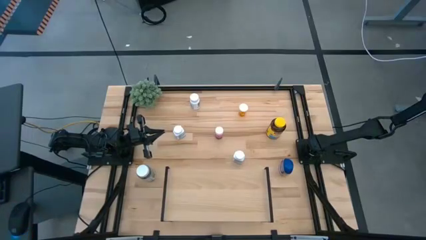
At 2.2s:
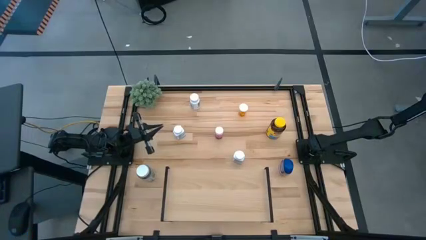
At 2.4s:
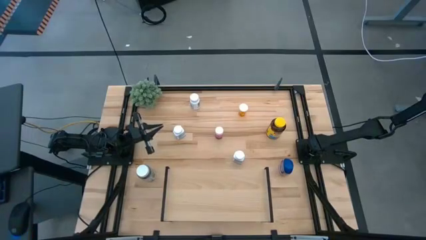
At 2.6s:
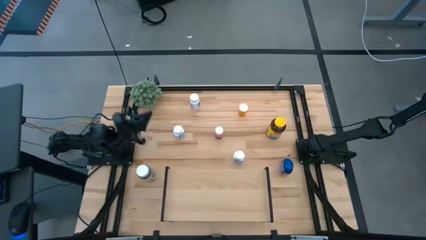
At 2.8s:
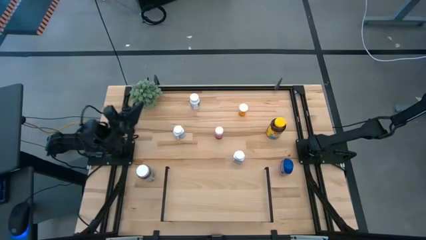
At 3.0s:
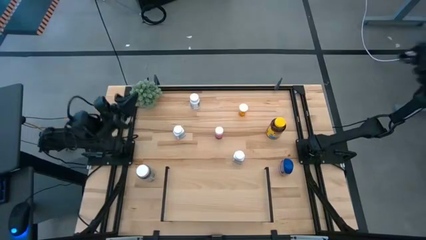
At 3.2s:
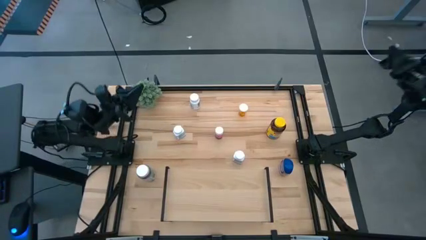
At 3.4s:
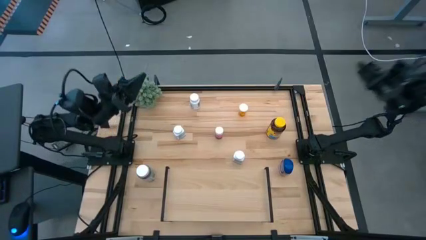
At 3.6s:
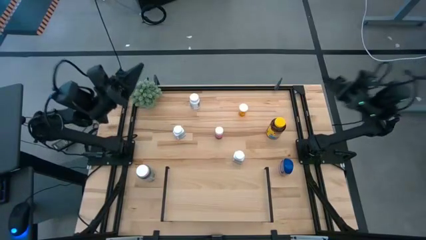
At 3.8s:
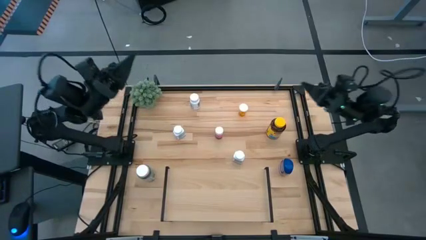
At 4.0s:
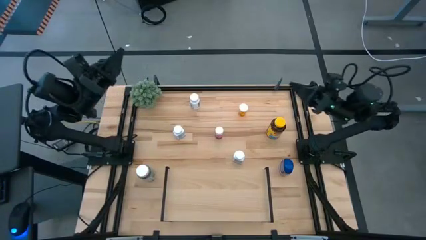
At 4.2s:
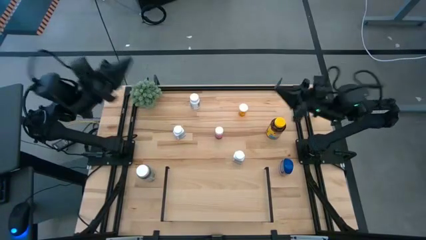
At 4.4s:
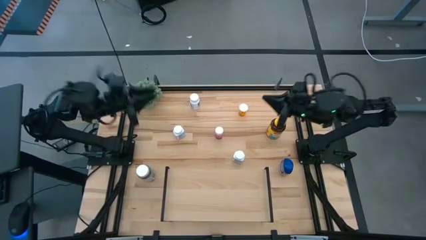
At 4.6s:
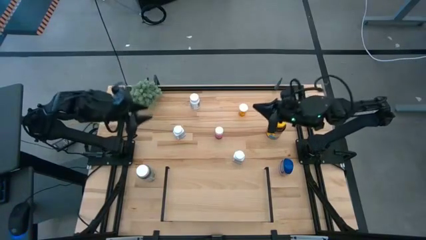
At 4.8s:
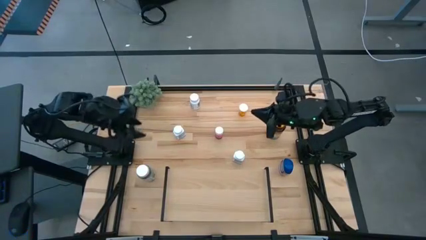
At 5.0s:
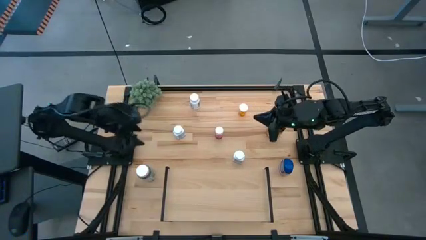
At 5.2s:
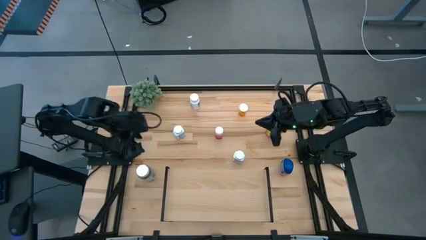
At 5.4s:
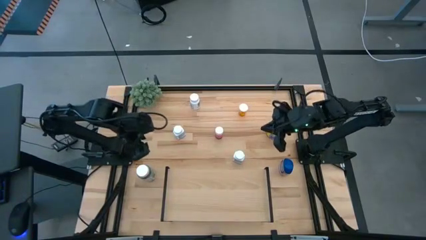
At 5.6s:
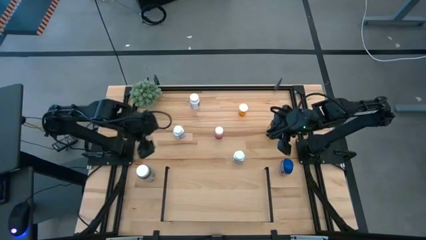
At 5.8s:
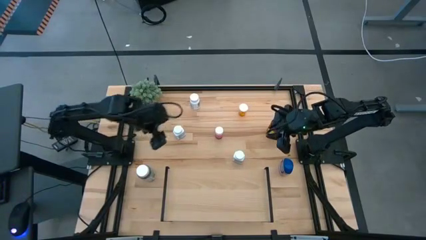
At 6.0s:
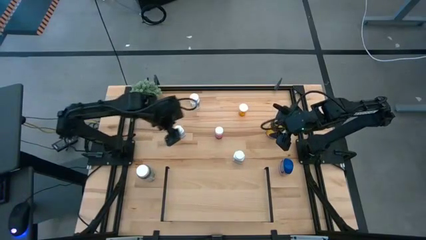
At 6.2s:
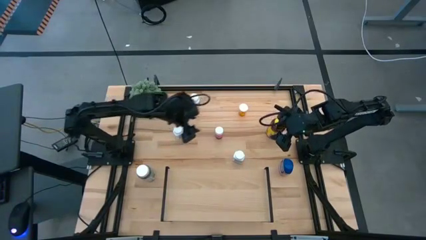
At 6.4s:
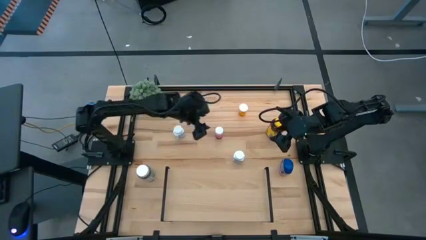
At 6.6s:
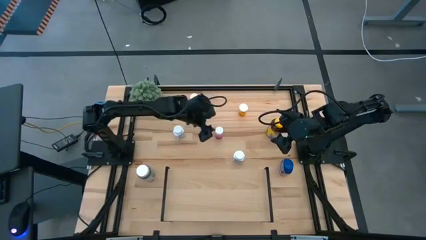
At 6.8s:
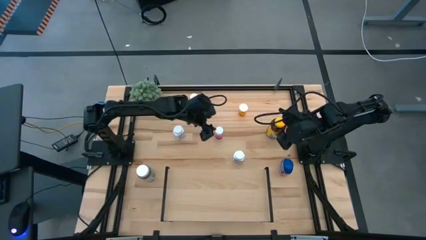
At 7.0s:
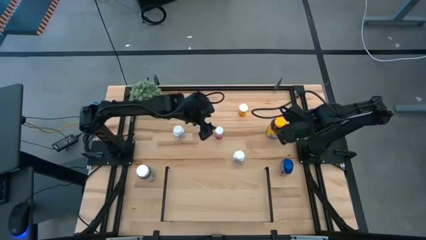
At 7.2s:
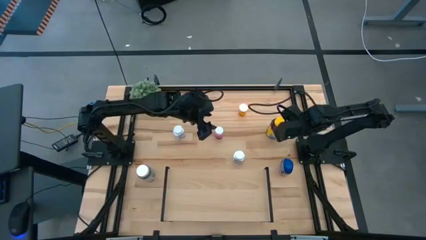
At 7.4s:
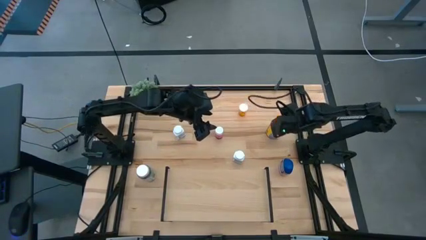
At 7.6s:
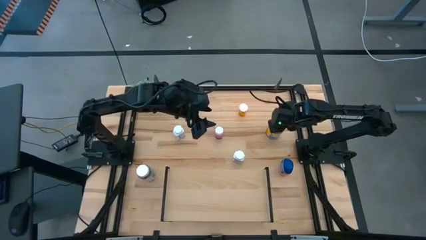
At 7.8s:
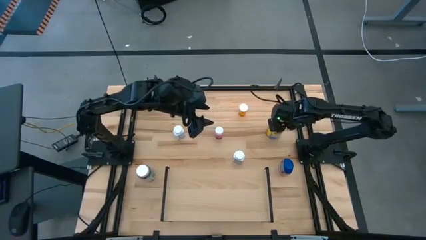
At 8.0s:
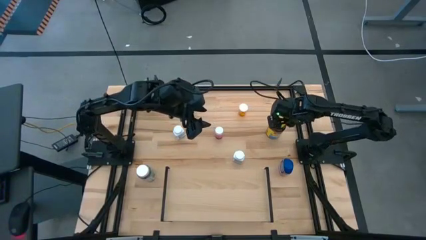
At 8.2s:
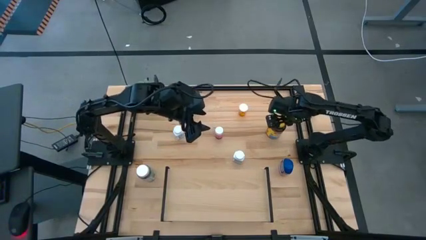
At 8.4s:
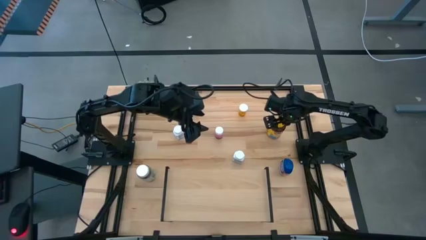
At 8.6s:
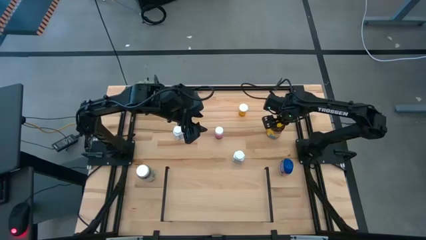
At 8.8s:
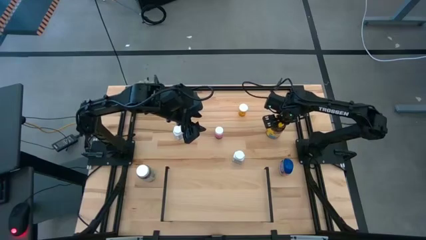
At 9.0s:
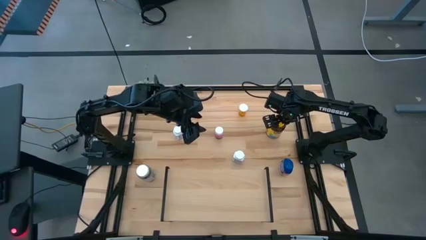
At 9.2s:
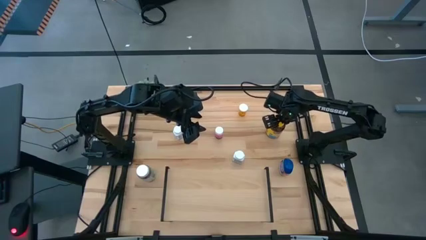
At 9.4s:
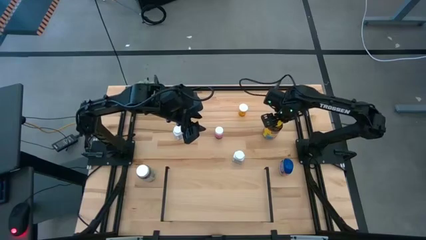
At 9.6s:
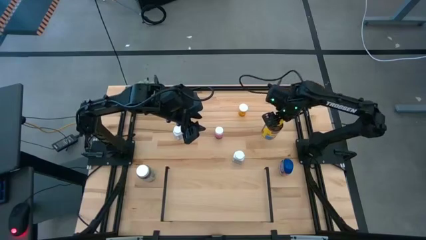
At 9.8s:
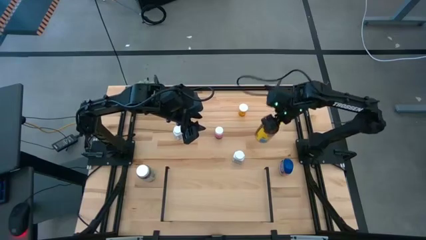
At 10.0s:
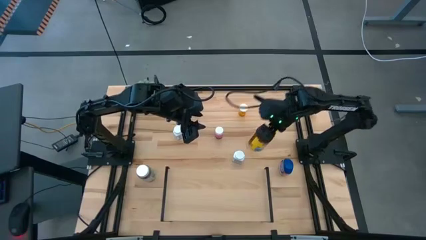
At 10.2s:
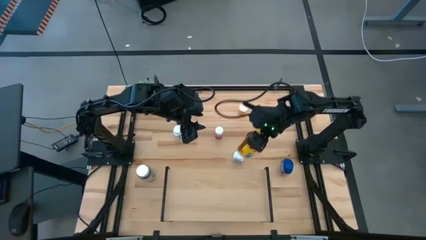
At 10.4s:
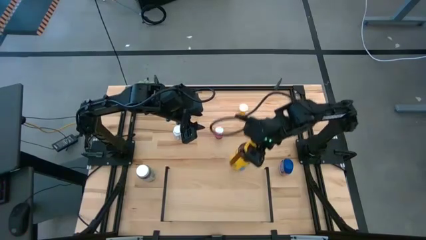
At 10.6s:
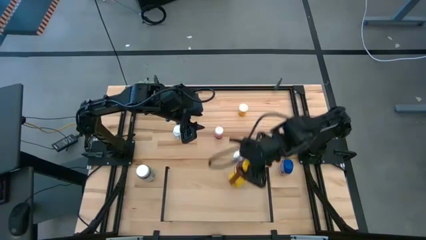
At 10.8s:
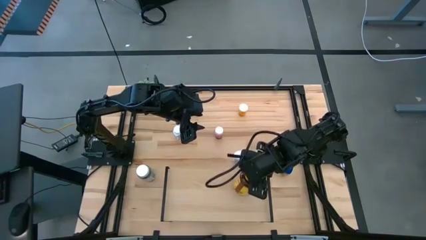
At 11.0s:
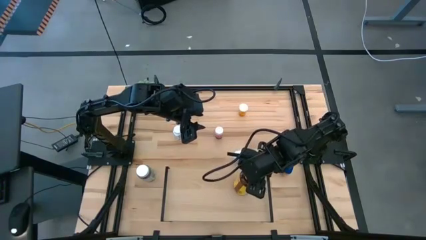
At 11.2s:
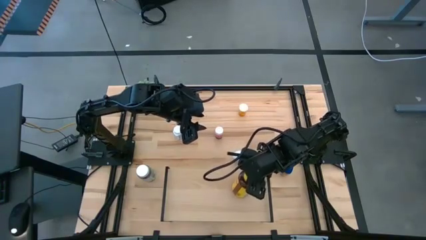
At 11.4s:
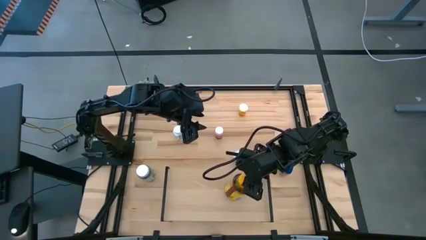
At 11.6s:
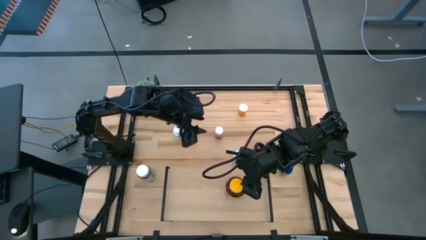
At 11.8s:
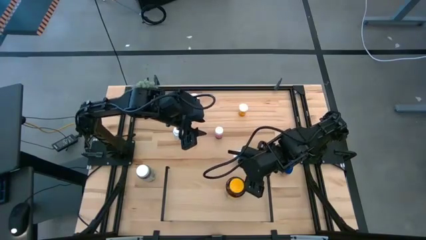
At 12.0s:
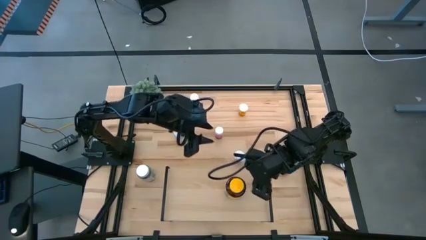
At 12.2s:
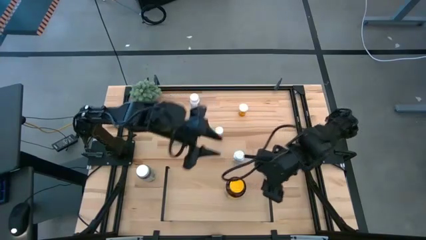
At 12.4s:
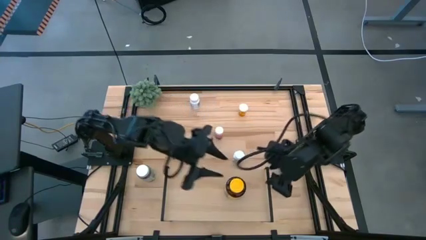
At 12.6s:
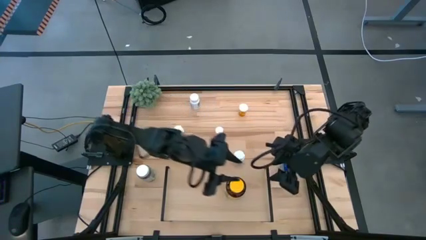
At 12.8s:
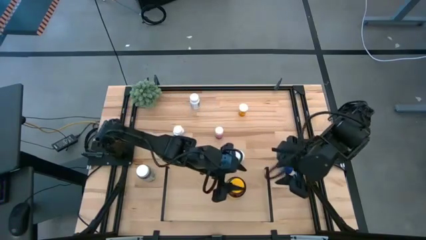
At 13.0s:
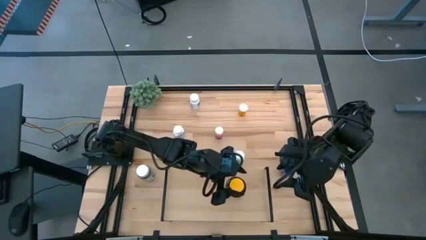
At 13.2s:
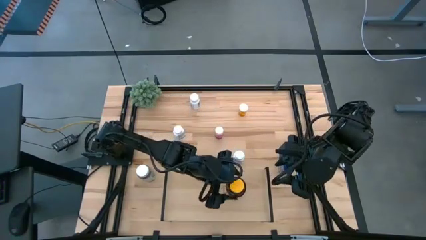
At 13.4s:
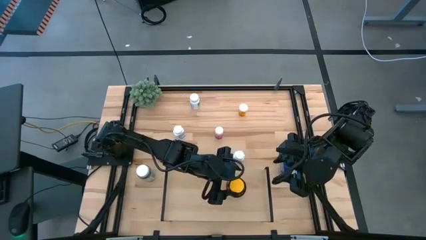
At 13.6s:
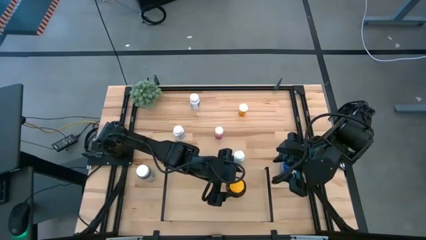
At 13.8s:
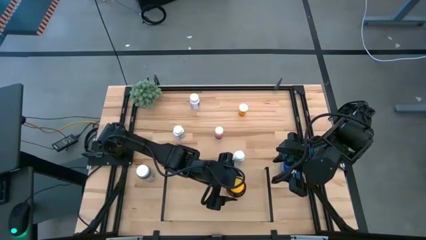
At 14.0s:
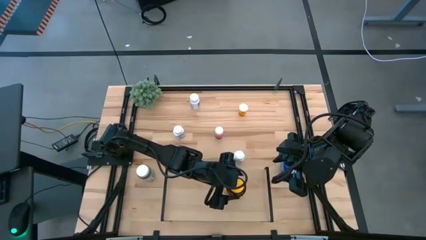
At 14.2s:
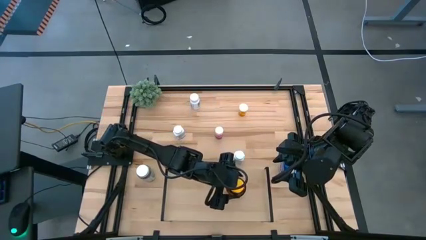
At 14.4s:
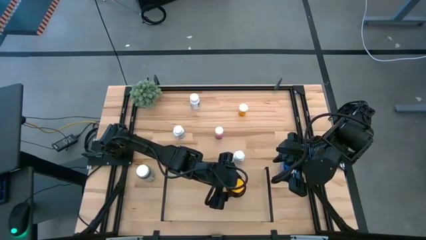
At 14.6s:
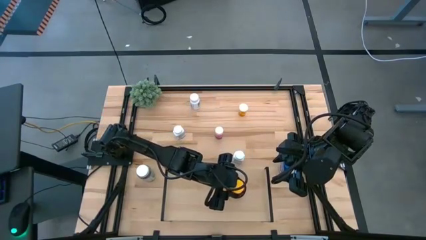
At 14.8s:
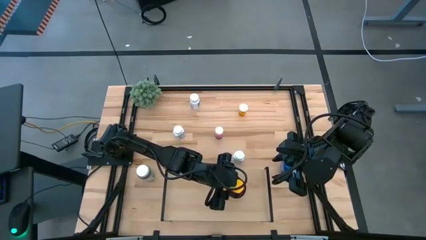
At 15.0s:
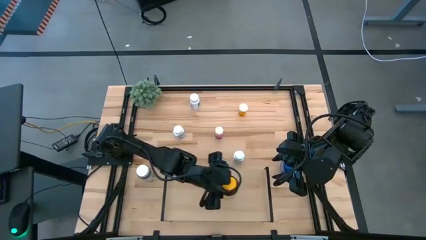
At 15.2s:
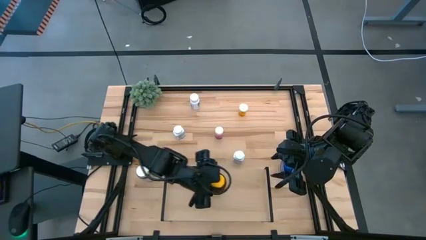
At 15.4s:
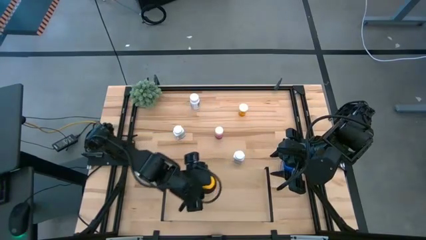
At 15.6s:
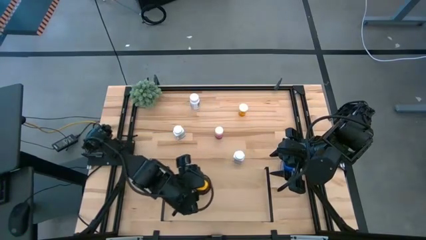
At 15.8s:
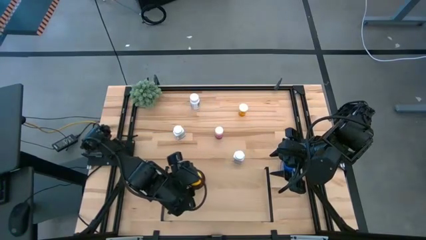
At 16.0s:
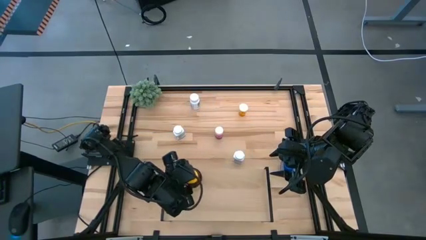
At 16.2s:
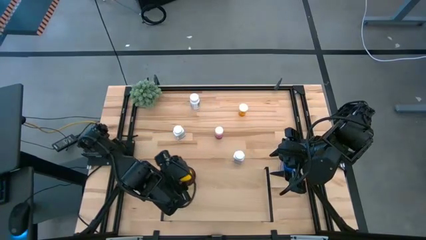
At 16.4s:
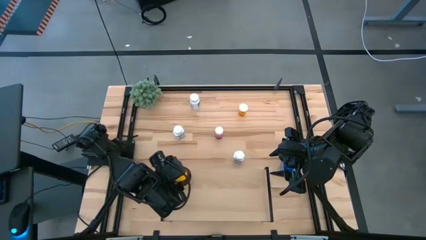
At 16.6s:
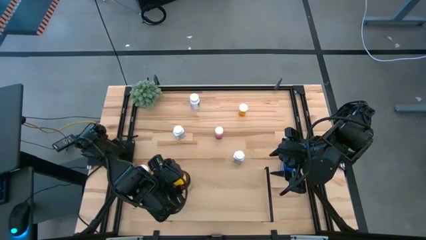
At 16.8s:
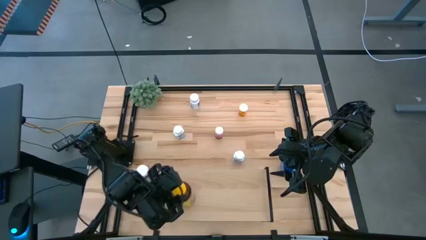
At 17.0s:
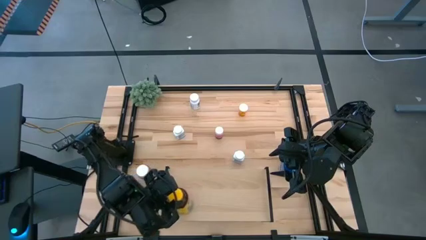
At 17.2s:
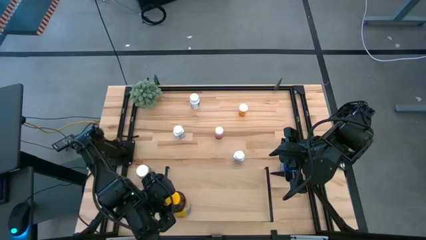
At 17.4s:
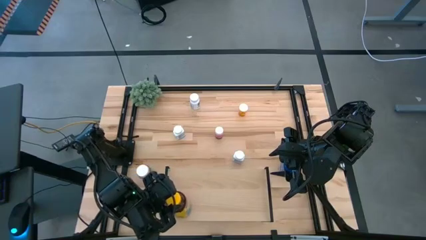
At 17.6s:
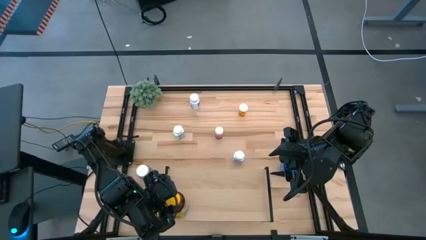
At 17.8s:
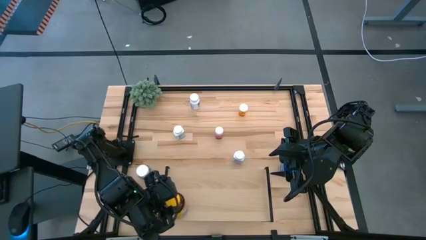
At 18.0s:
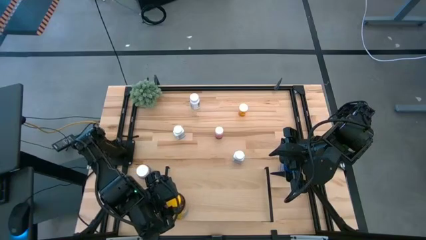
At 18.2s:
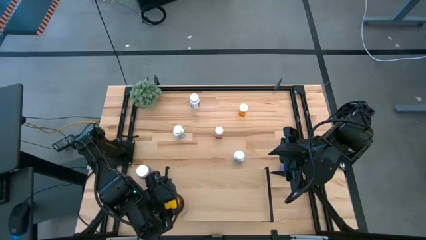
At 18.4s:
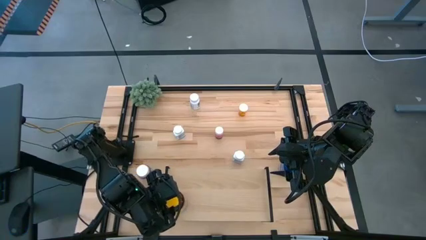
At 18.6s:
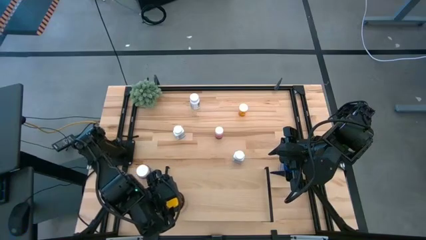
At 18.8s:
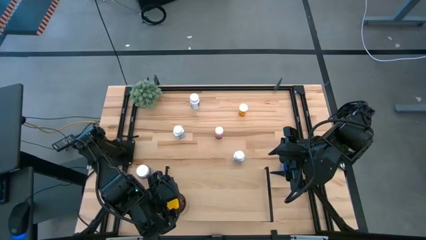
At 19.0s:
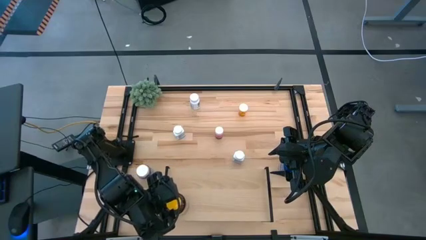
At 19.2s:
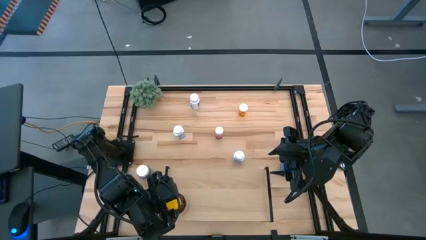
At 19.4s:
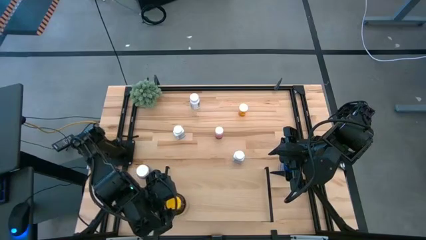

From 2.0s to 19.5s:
Task: Pick and place medicine bottles onto shelf by color
Put the yellow pill bottle on the shelf
